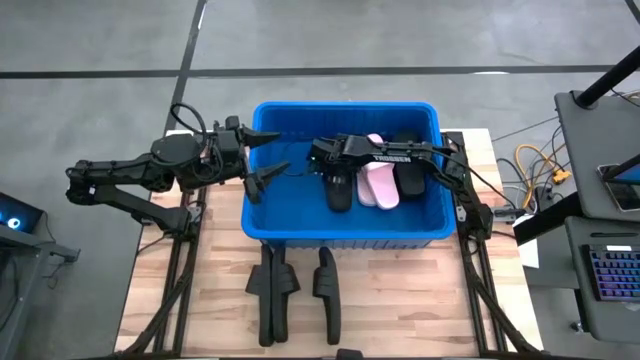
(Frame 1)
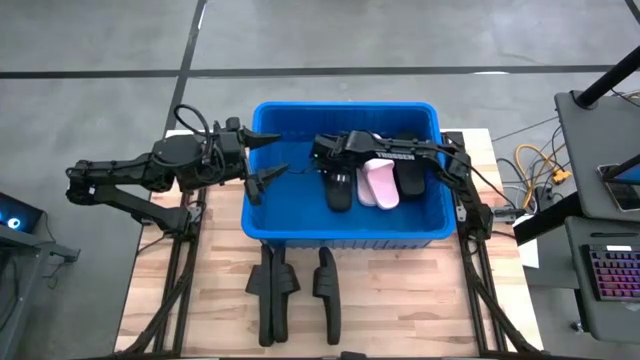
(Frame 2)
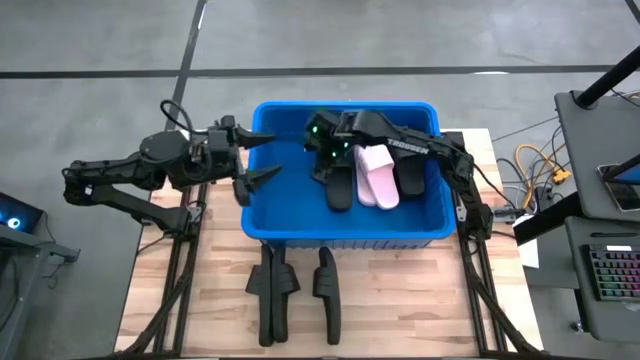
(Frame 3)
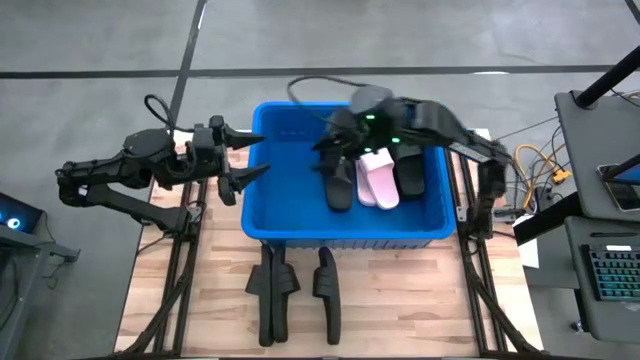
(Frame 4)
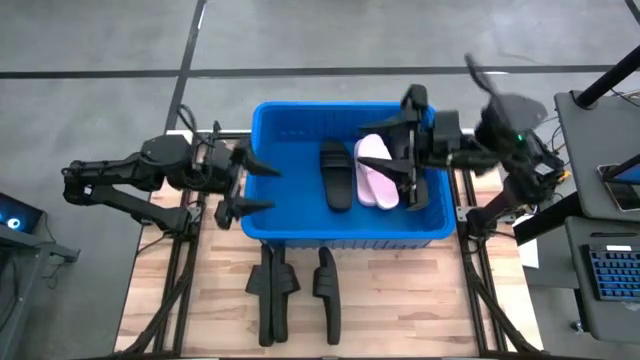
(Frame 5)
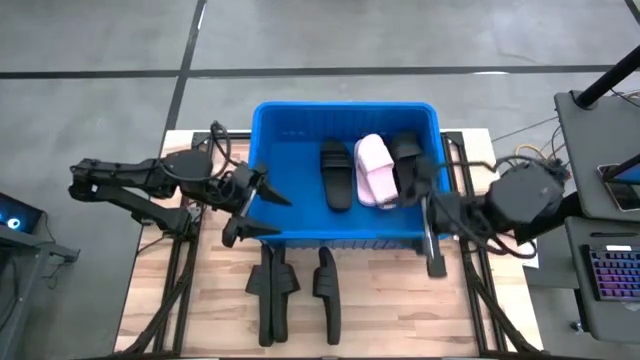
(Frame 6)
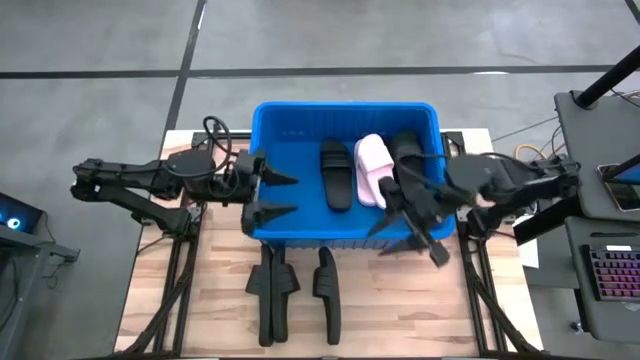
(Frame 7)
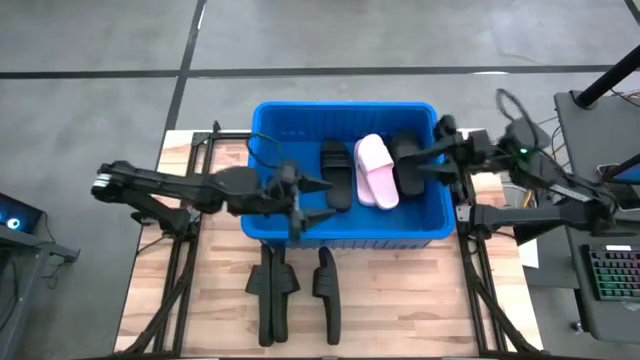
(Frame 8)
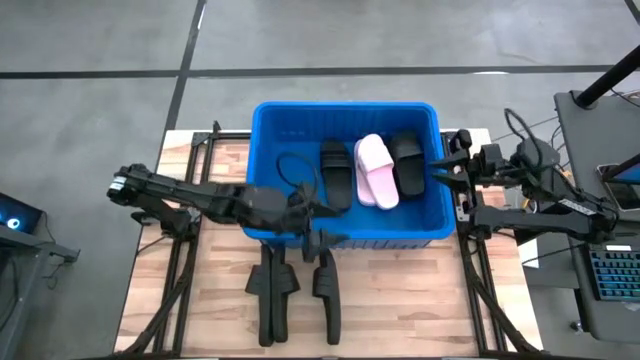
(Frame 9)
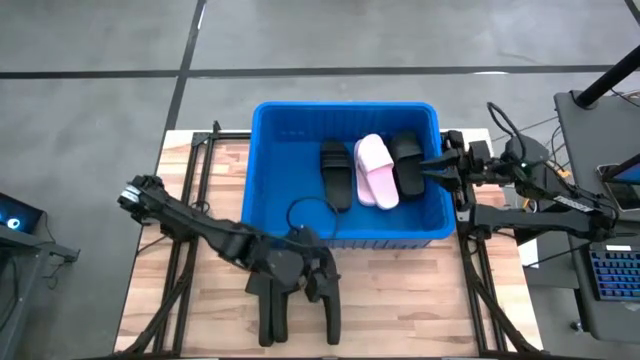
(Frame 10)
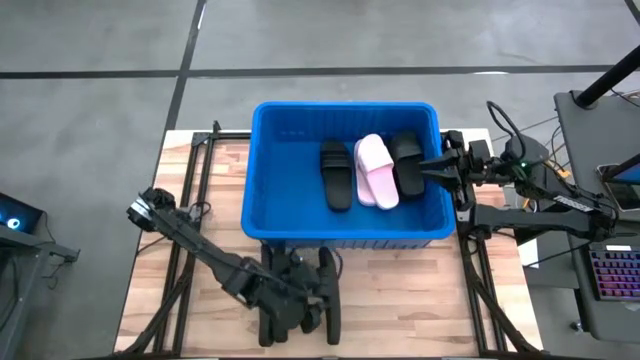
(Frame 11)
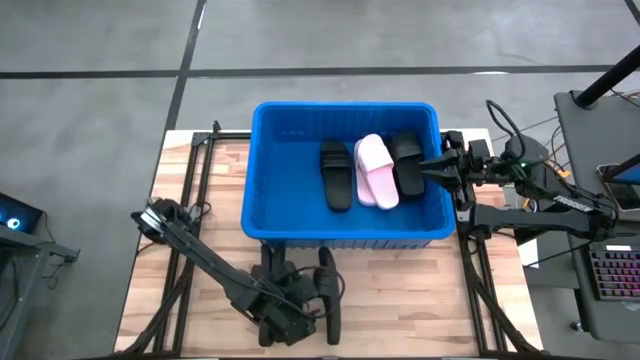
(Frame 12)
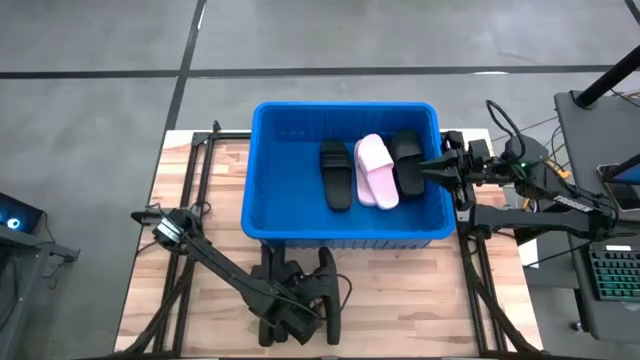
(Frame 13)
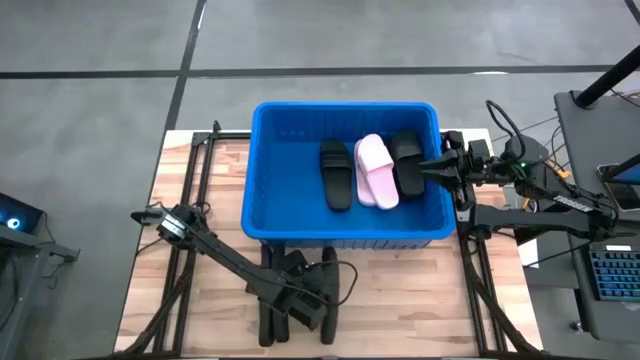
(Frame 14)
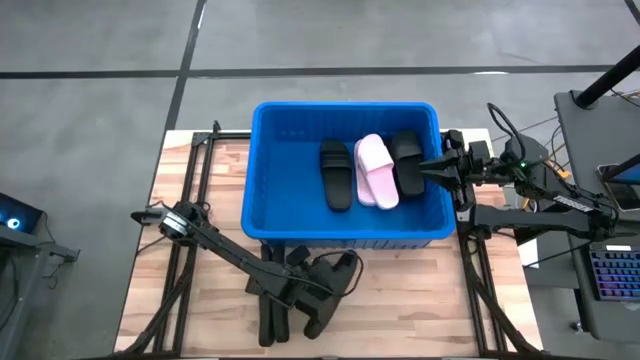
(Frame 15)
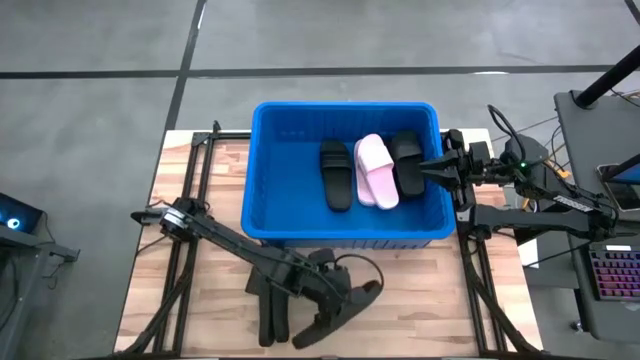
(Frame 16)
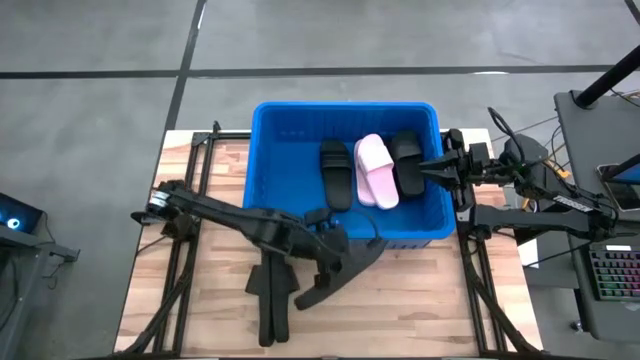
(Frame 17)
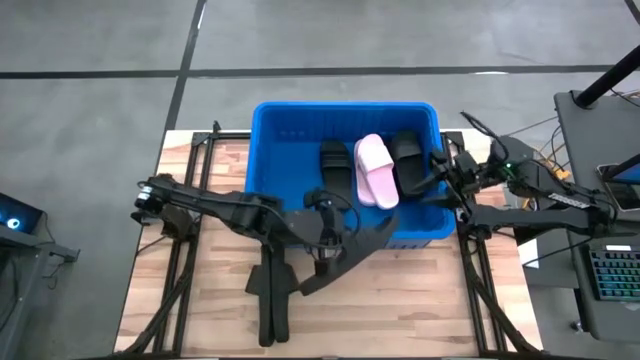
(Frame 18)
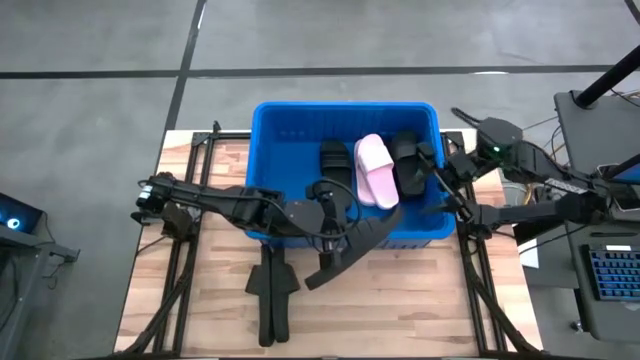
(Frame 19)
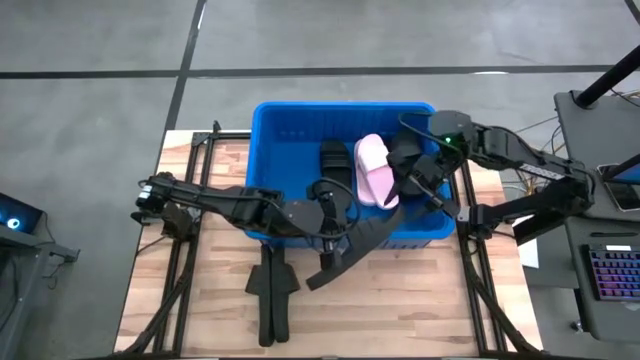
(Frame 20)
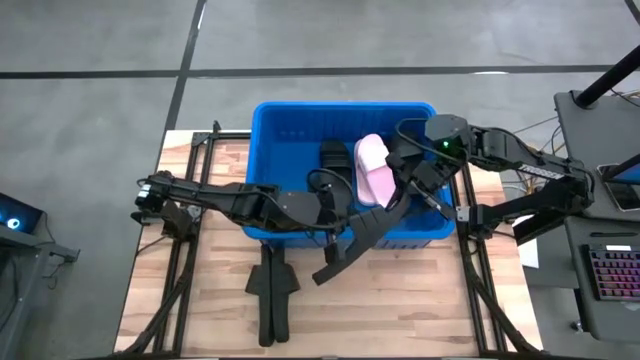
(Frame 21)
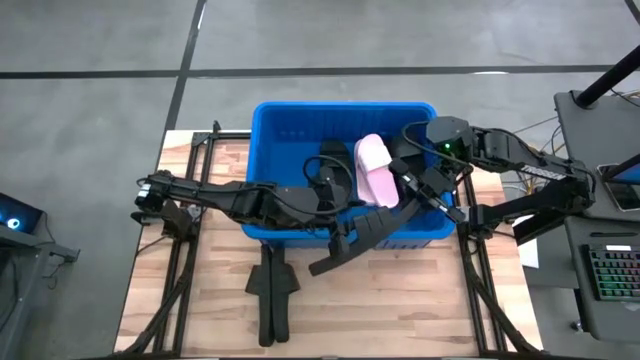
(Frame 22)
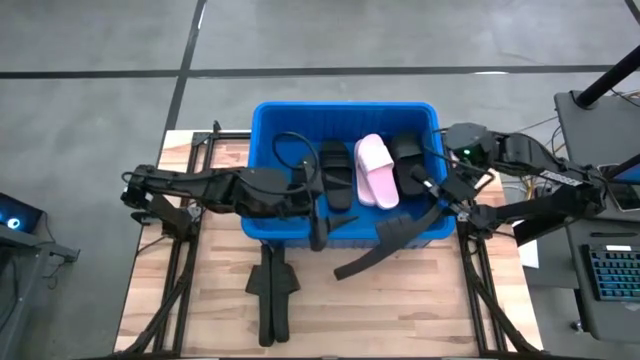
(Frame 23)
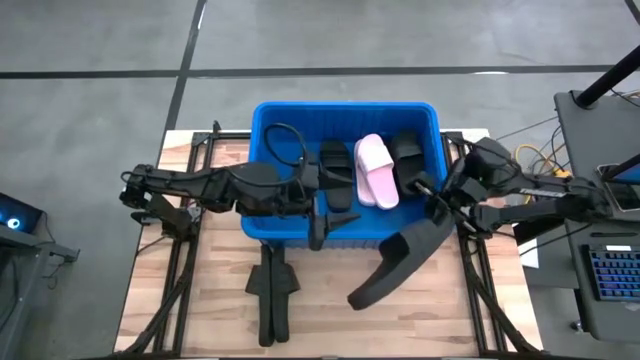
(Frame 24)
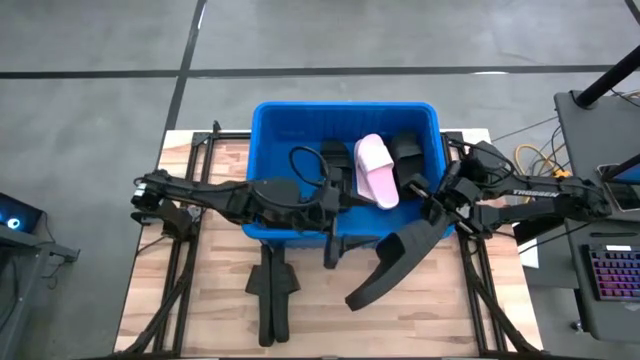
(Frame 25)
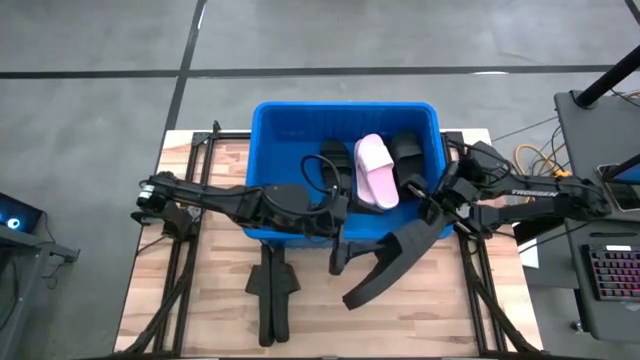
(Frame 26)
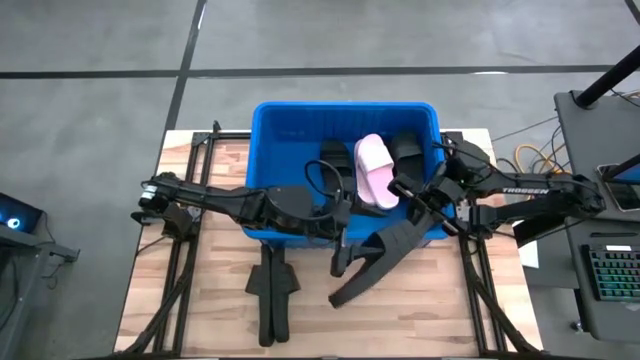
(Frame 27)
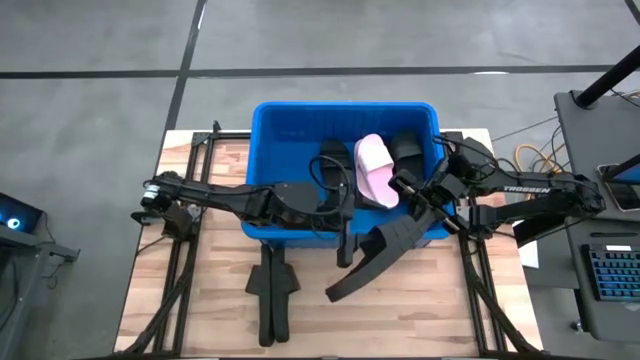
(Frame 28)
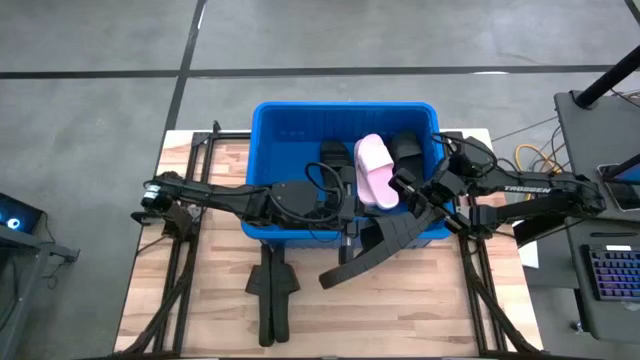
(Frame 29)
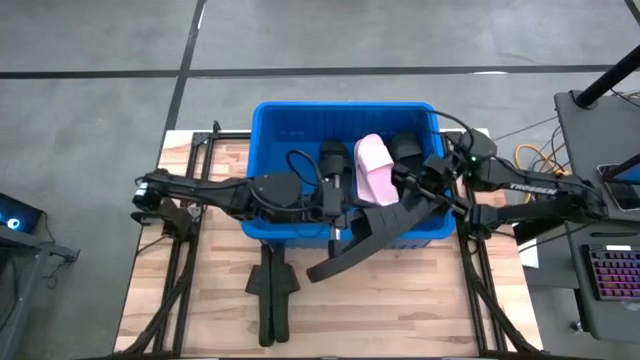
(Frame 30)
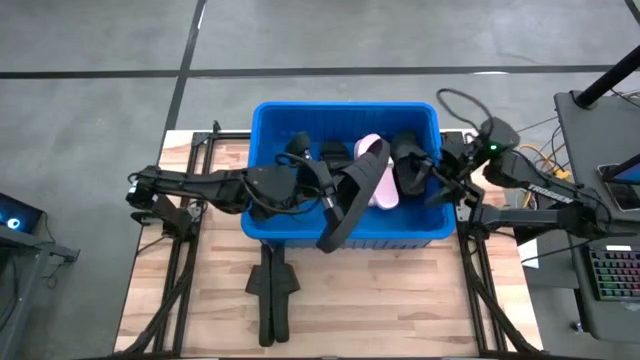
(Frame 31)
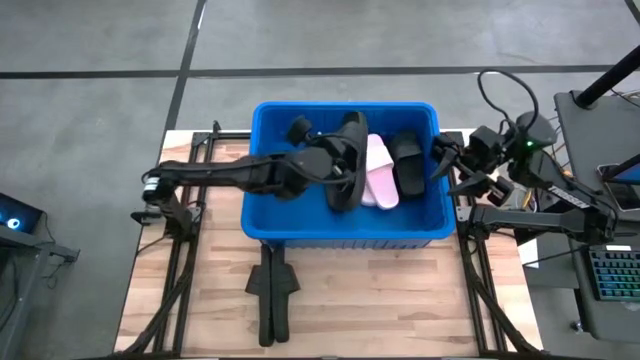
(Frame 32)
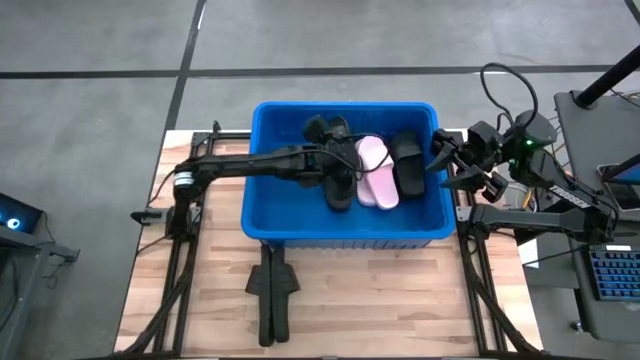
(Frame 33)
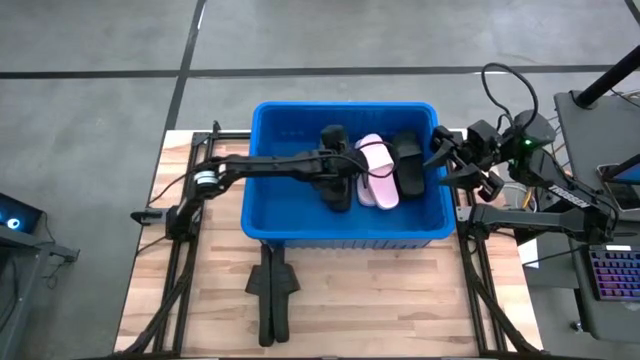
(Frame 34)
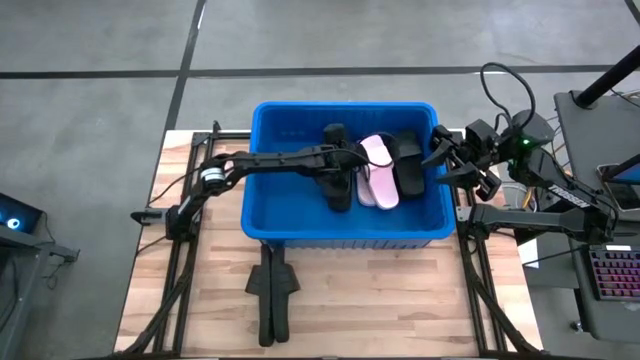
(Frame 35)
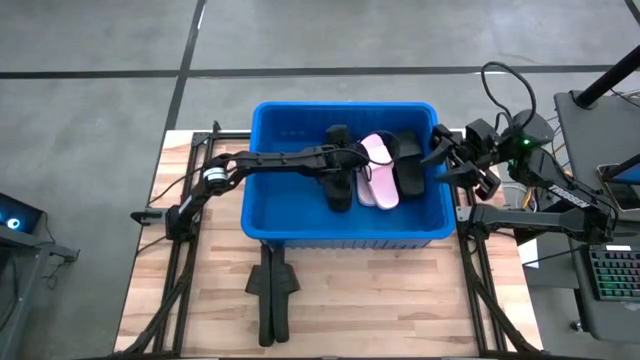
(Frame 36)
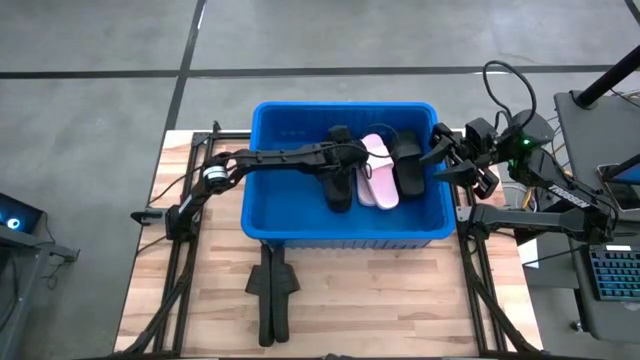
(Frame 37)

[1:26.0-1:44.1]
Task: Pick and place slides into bin
Put the black slide into the blue bin
